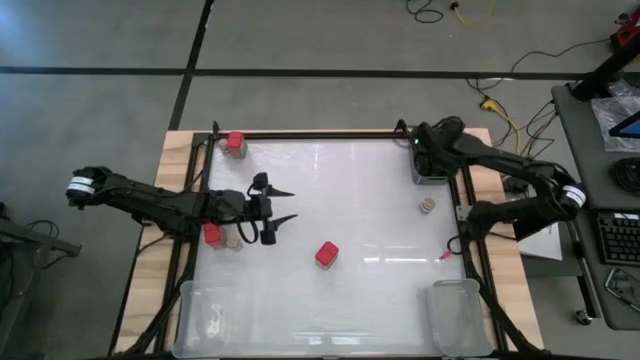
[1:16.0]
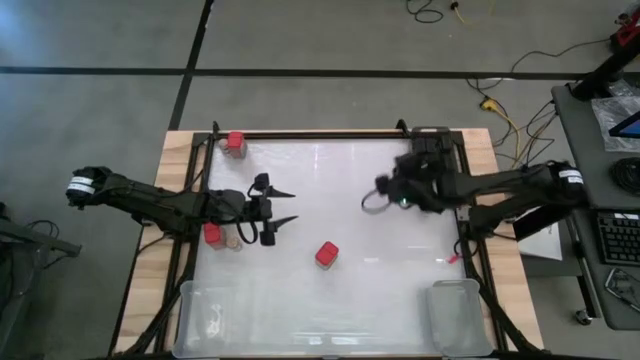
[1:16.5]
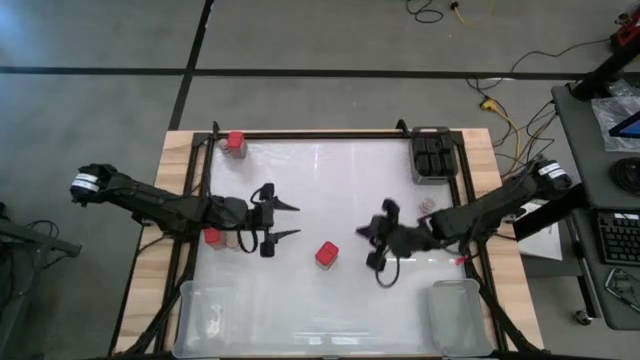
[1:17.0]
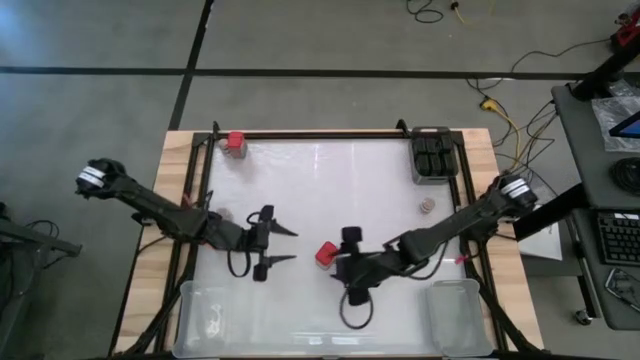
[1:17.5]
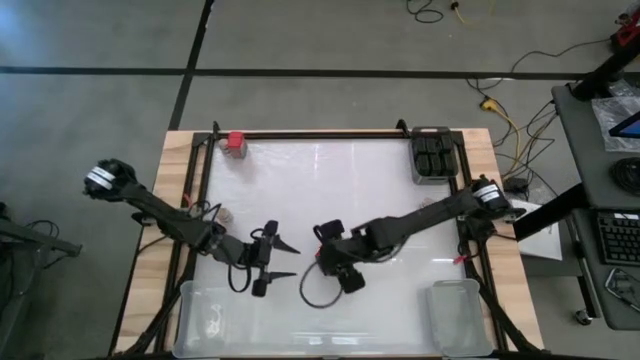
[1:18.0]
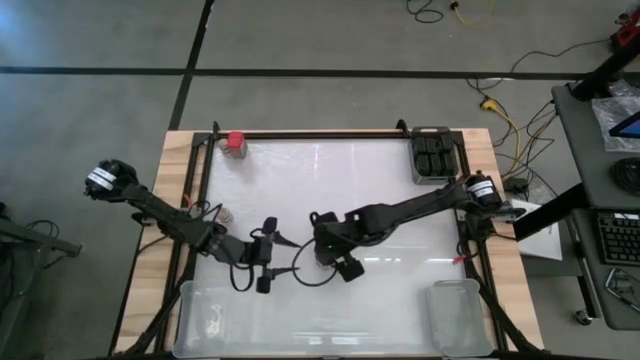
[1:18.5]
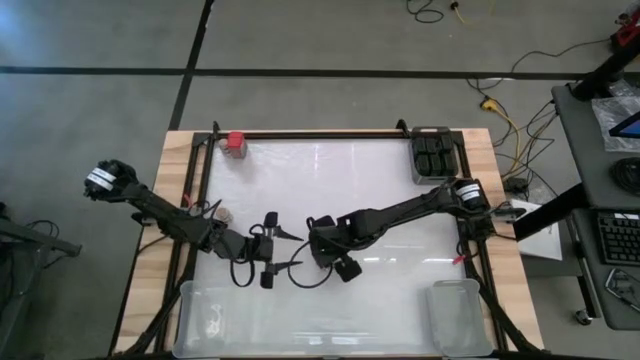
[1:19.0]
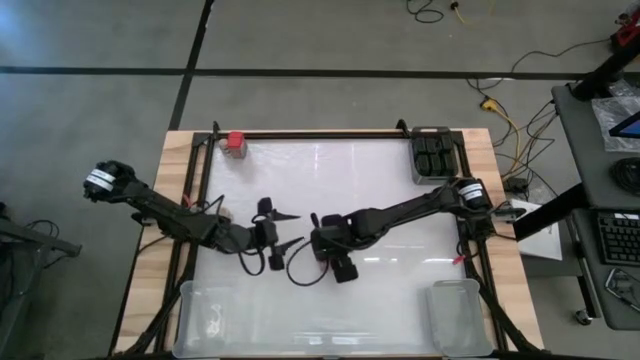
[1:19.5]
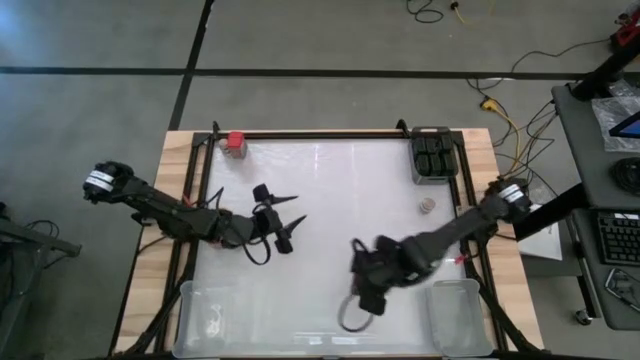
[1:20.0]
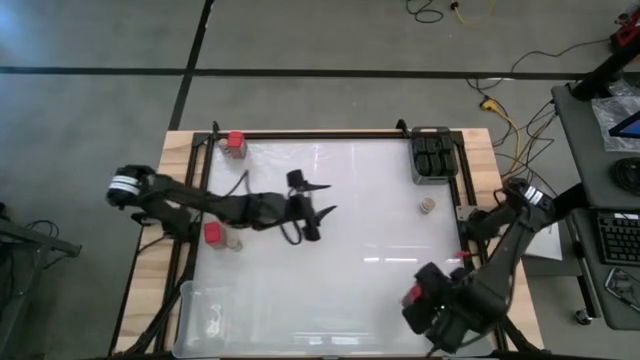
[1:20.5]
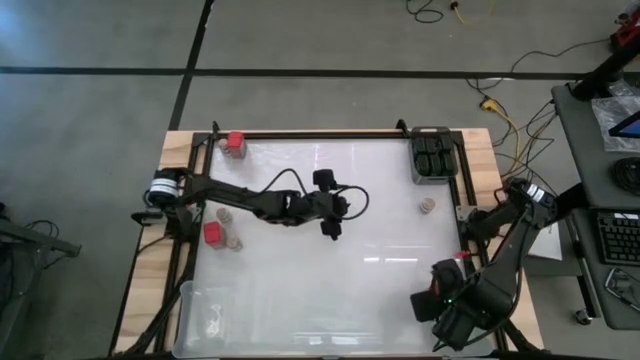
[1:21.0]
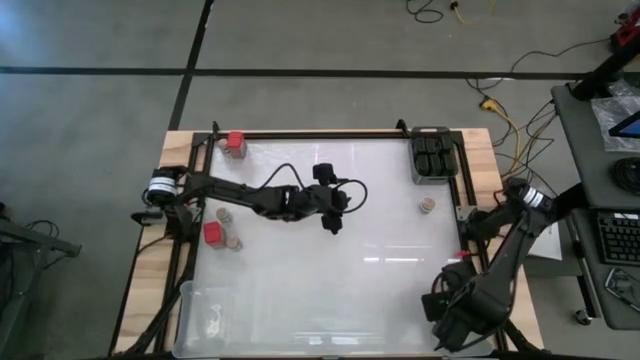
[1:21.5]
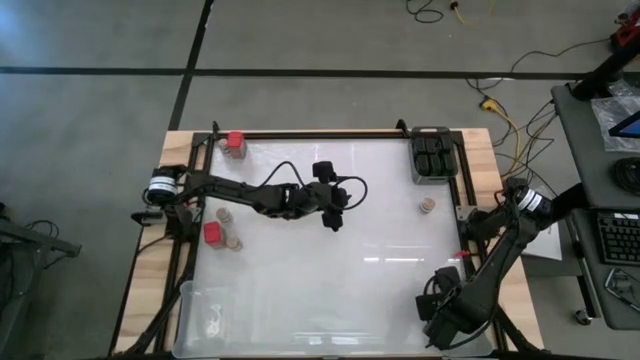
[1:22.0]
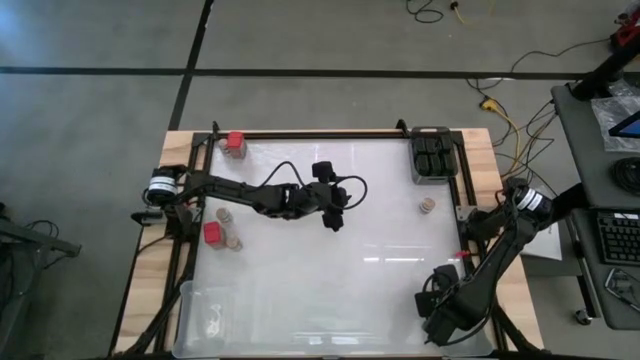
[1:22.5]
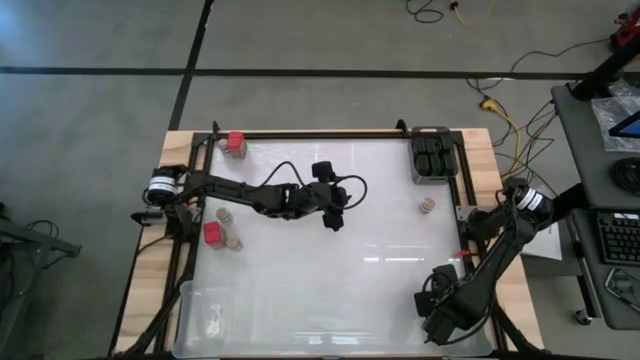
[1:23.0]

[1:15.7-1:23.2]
Task: Sort spices by type
Put the red seasoning can into the gray bin

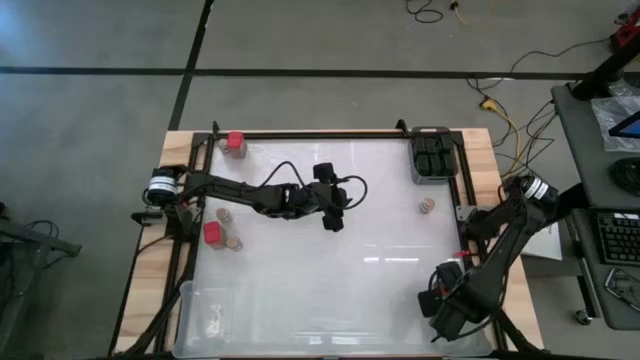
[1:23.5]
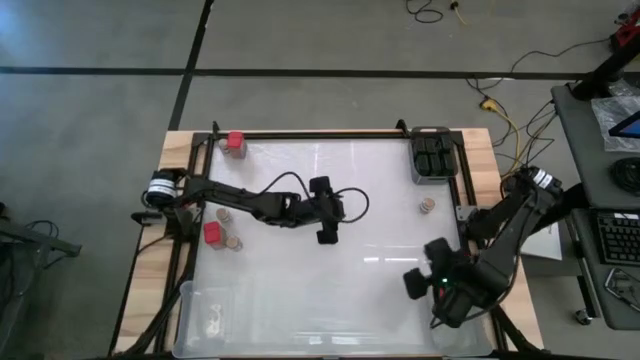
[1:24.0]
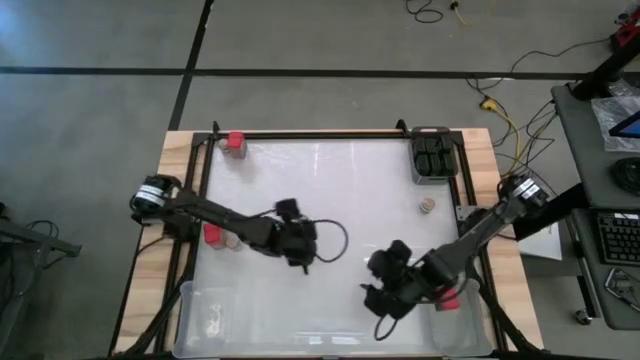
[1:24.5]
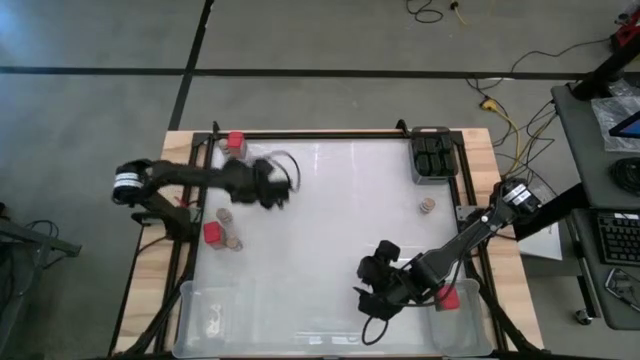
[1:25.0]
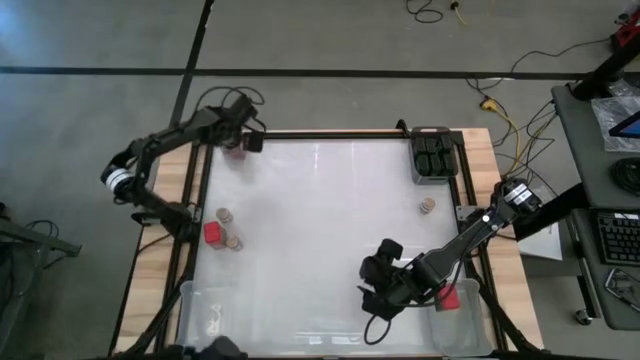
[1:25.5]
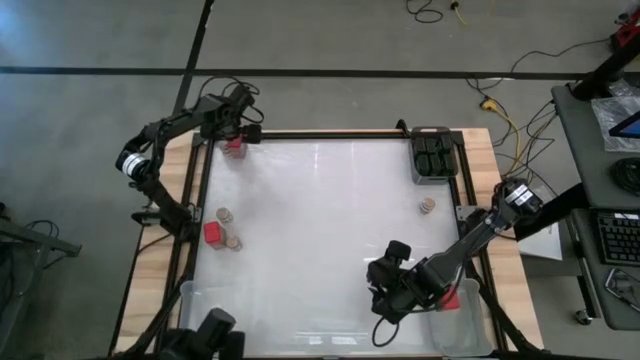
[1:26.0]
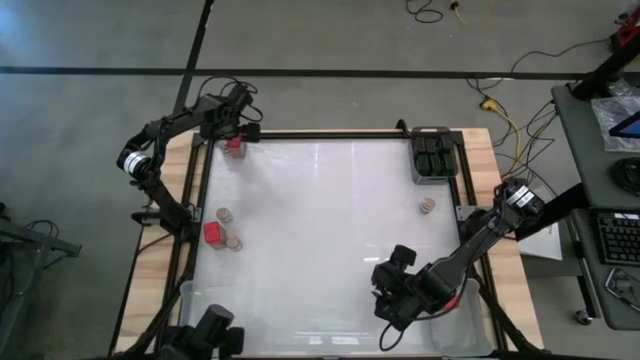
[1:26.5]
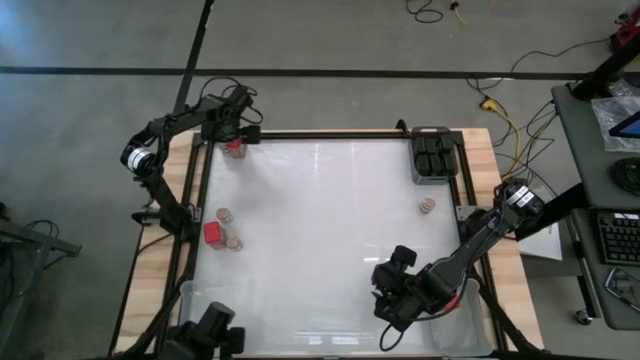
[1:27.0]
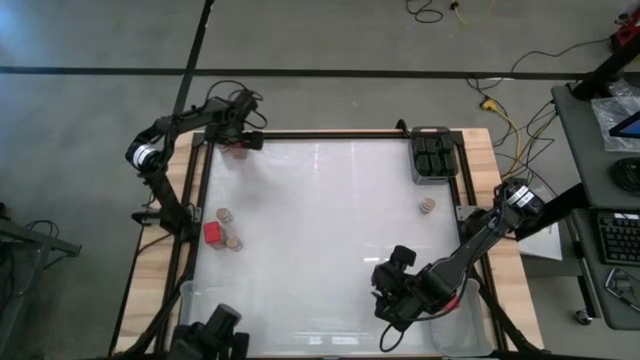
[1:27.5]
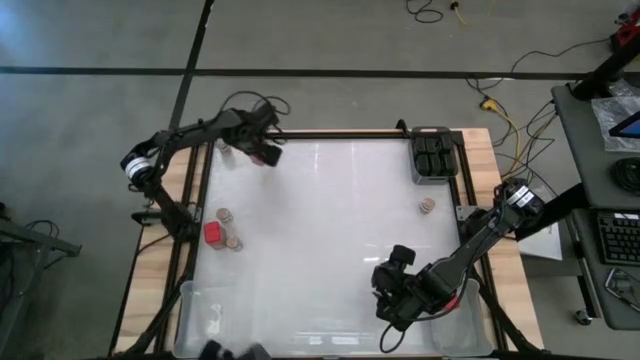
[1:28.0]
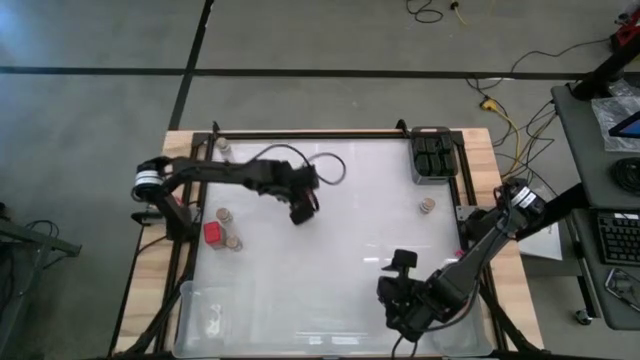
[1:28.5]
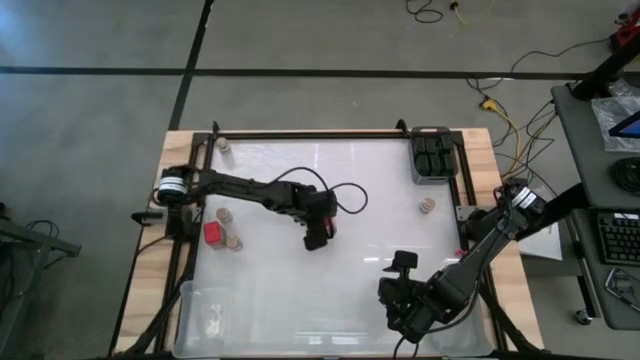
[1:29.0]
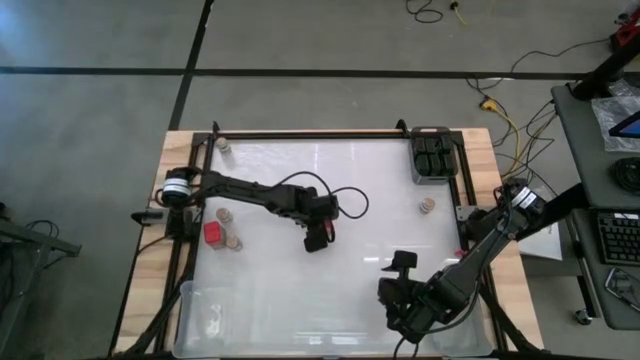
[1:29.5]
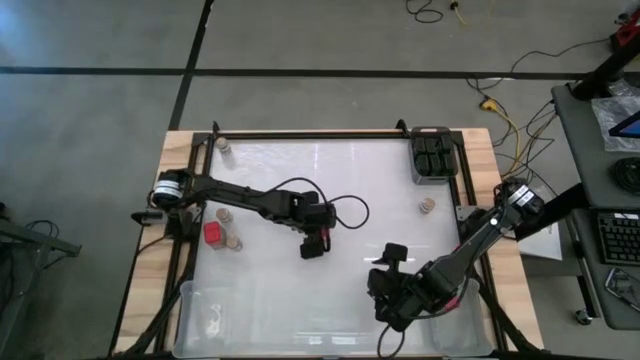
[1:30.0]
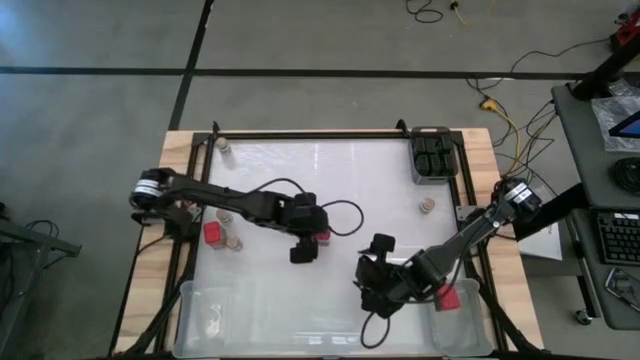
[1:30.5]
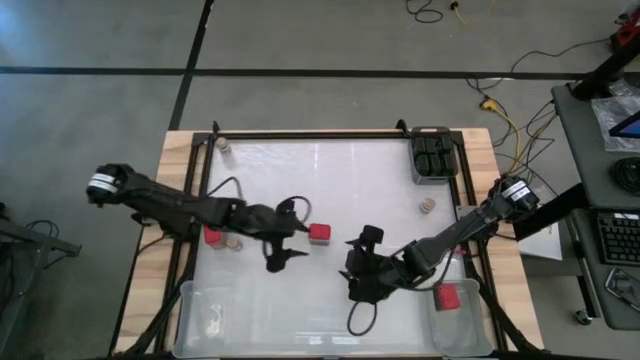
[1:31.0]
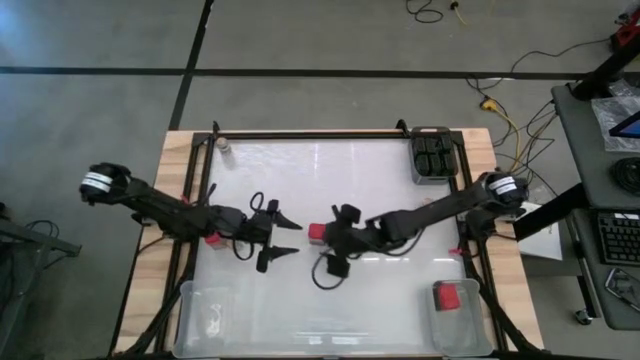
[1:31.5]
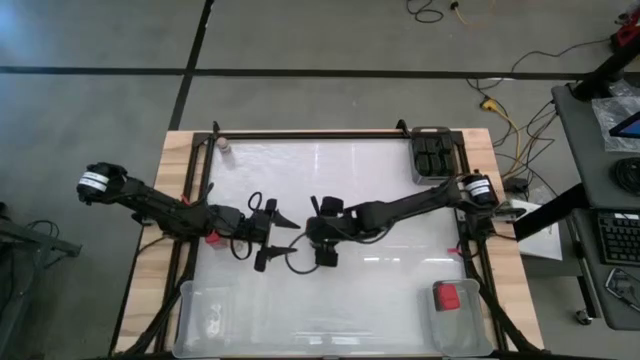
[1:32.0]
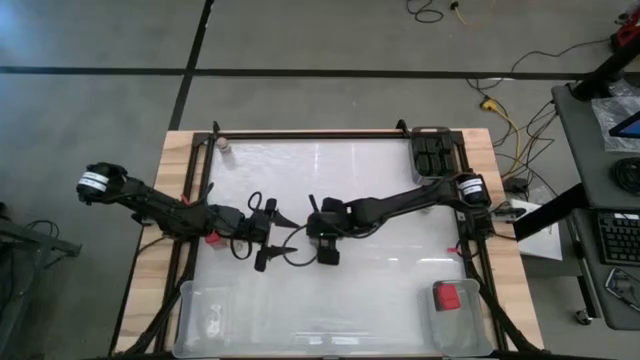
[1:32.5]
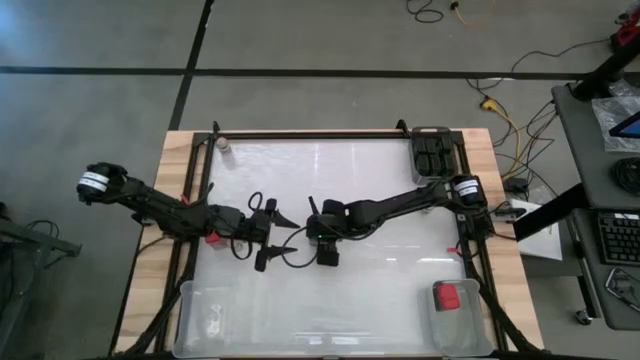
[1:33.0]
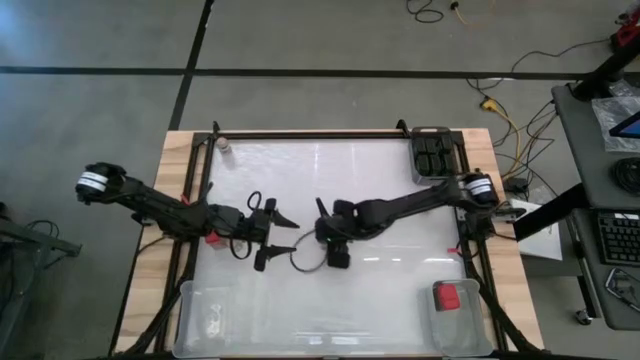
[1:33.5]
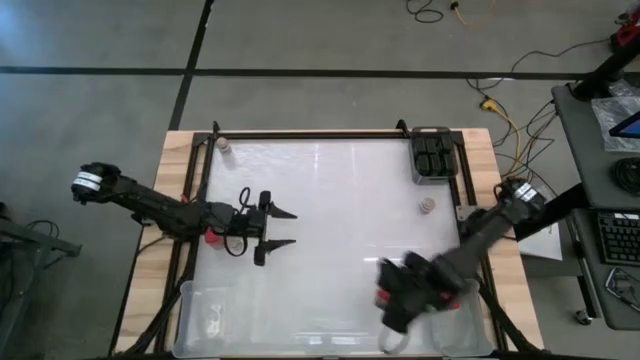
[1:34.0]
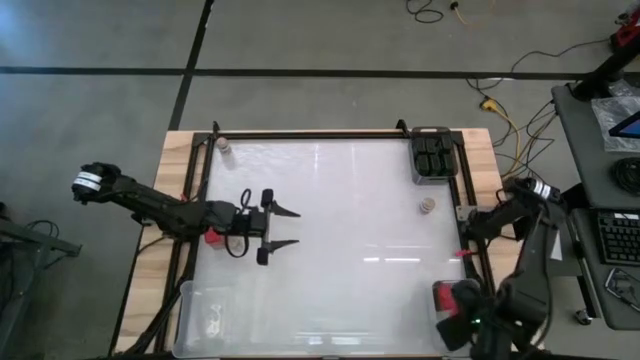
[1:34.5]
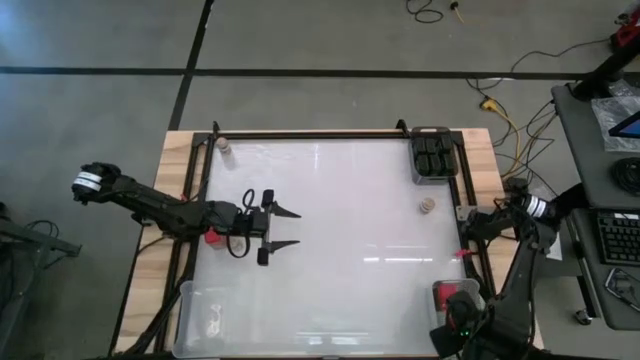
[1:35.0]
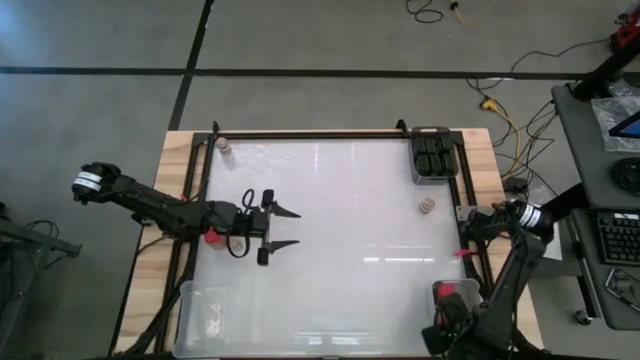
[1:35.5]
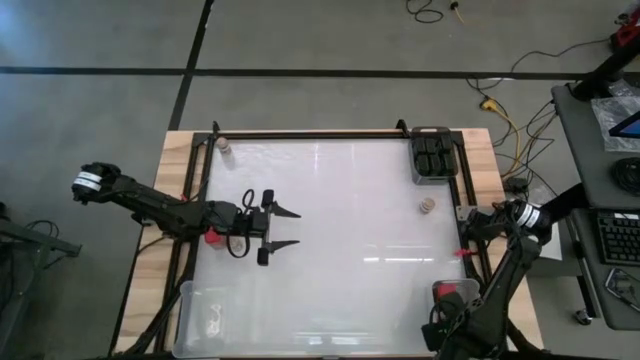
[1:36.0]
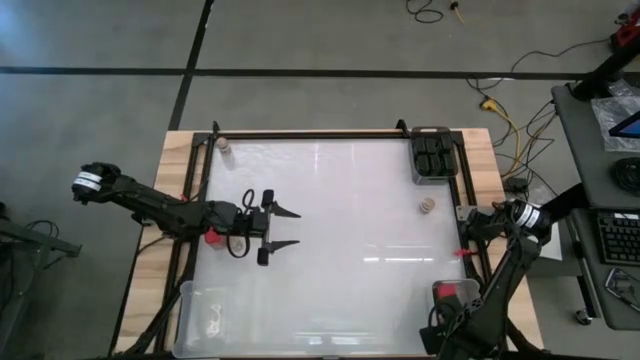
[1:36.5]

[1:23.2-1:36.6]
Put the red seasoning can into the gray bin
